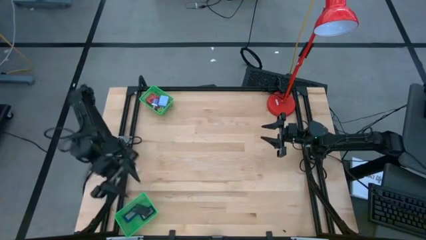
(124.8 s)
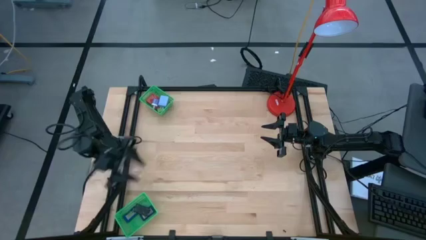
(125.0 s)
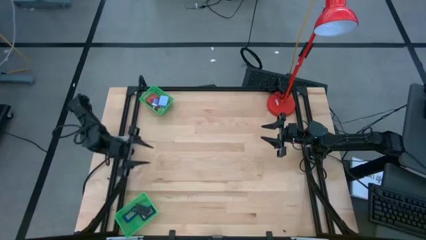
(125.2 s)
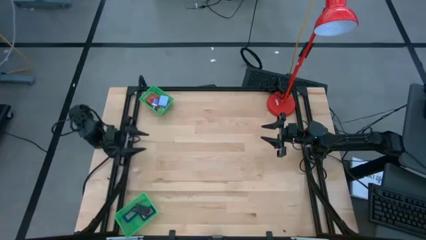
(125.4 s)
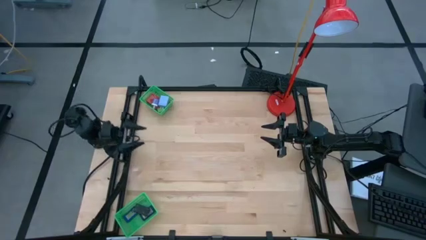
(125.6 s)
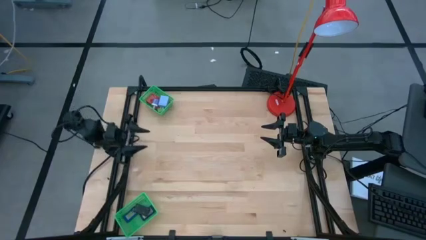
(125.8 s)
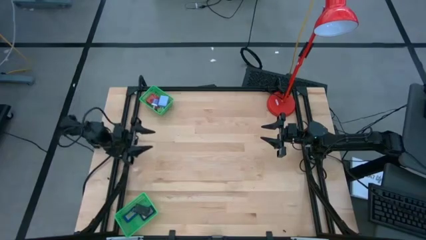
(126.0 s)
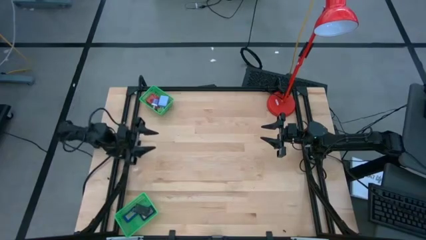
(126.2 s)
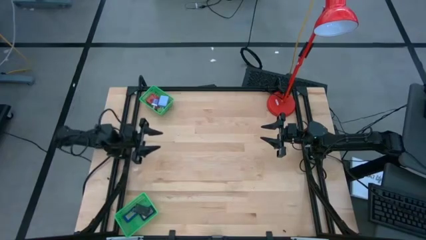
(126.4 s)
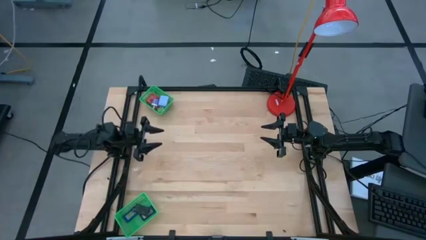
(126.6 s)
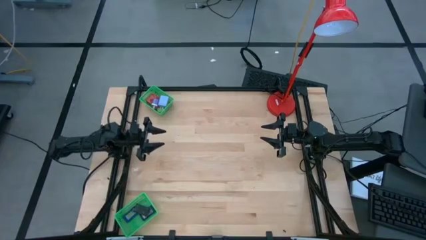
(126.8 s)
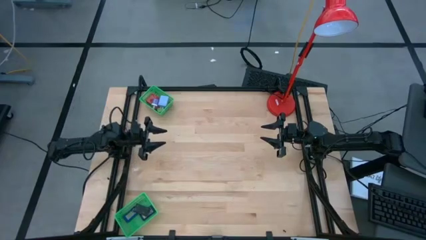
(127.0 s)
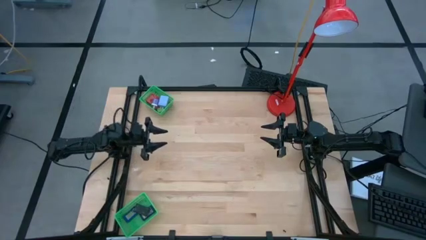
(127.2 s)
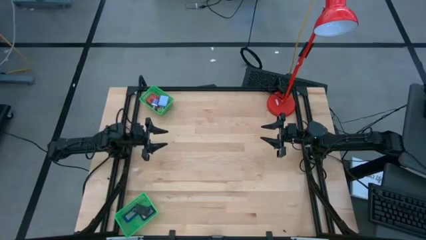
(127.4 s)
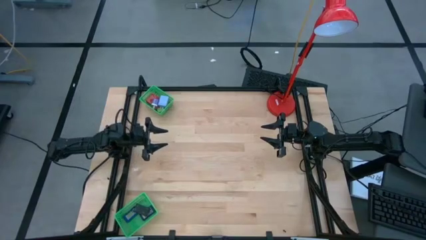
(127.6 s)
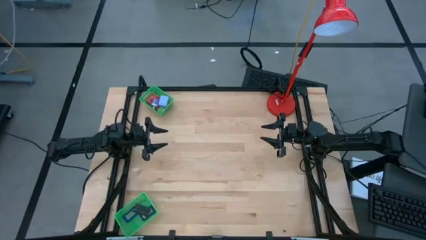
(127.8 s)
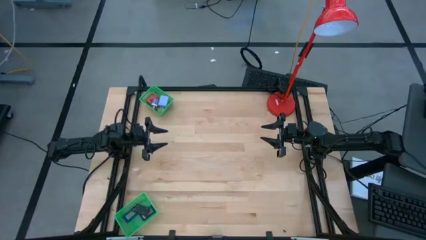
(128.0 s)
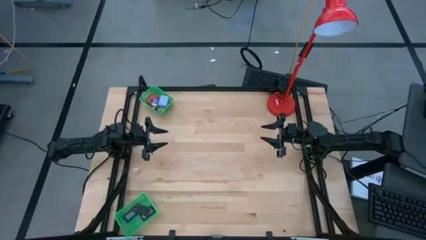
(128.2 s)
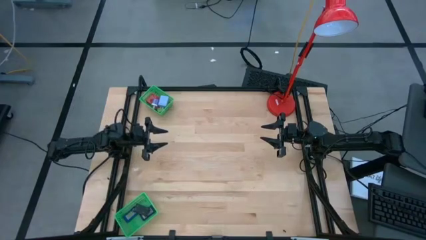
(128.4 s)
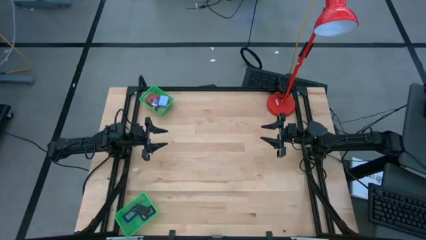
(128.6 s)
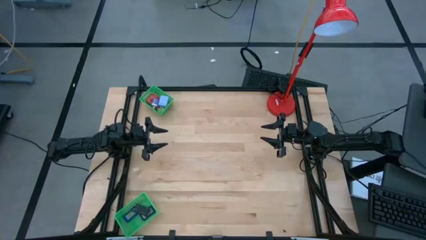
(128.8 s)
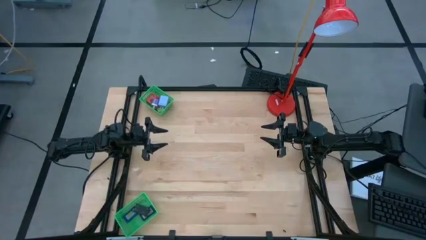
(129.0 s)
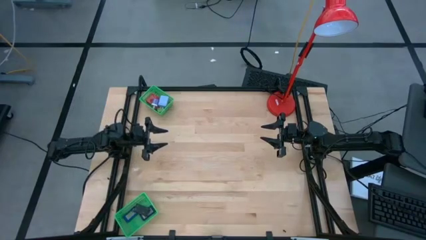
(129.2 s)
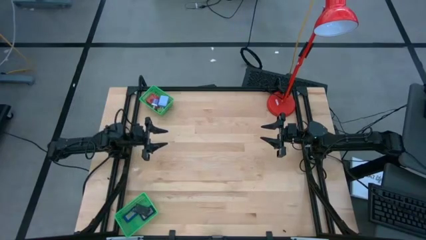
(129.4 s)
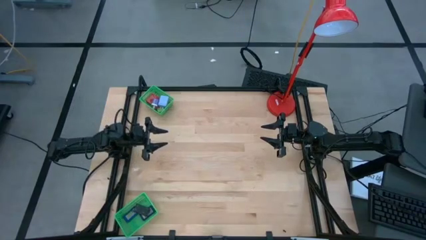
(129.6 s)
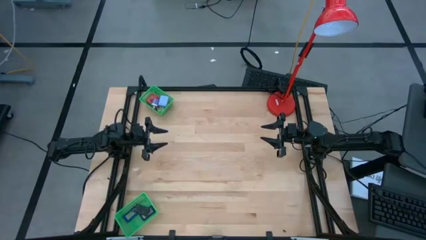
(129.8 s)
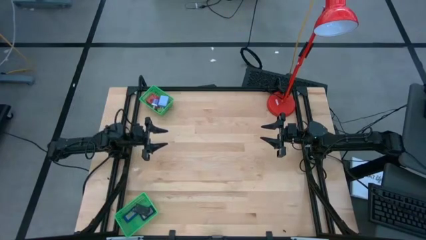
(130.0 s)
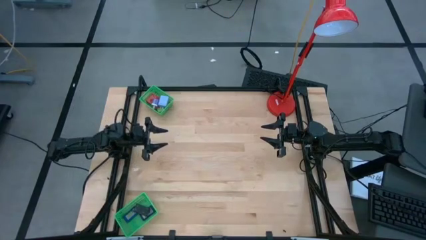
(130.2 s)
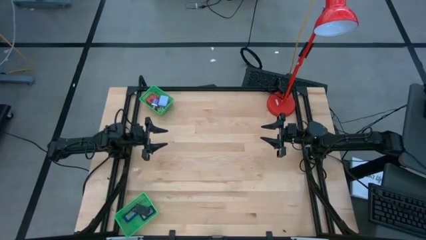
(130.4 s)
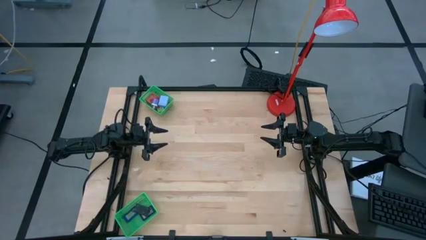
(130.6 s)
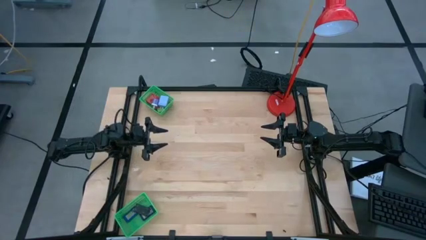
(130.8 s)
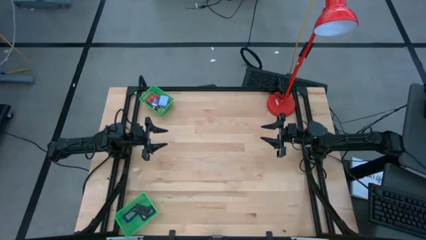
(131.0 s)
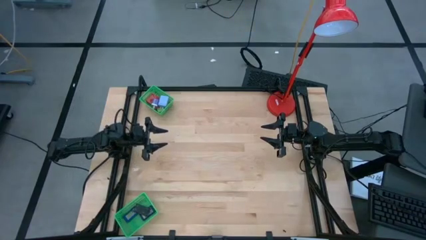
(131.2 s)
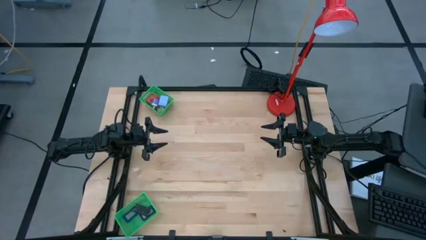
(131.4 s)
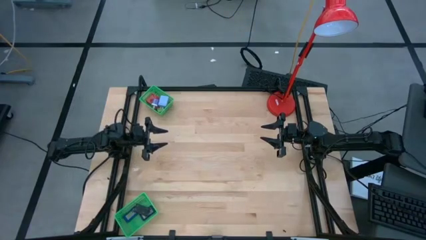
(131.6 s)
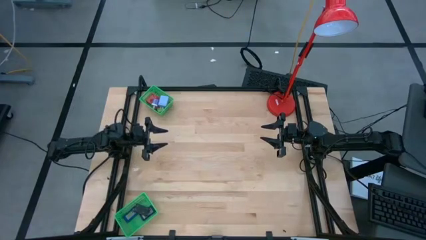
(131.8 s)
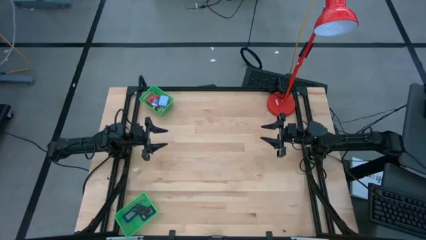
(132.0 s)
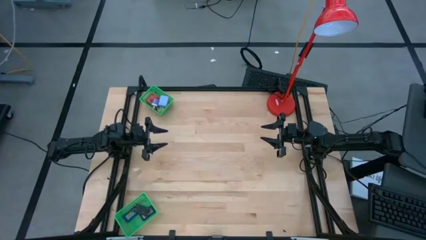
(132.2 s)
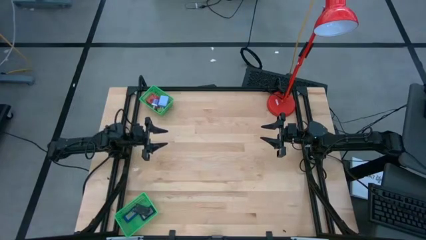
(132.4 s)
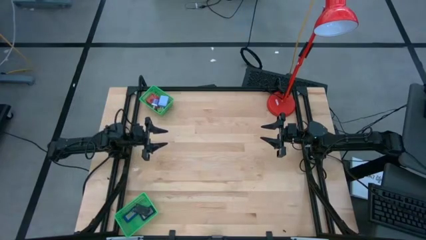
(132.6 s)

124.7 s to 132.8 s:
Task: Pick & Place Office items
Return to home position

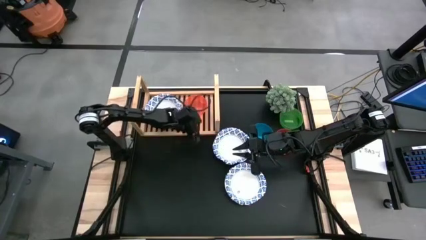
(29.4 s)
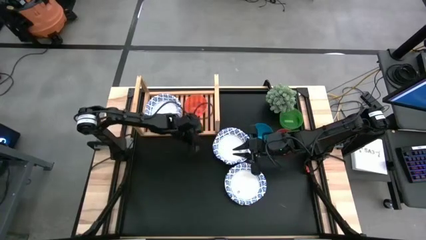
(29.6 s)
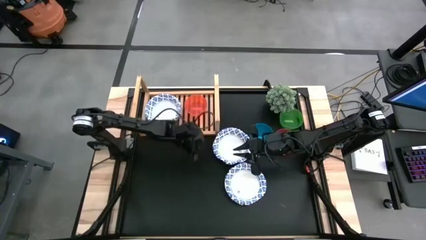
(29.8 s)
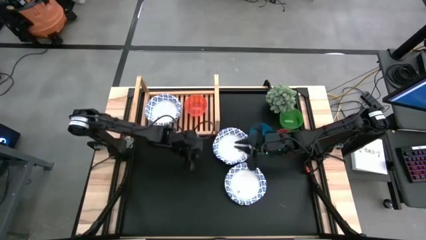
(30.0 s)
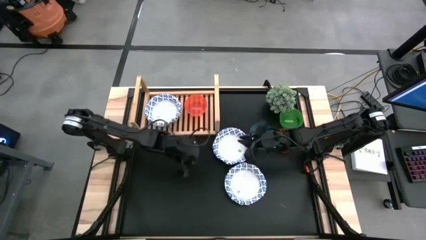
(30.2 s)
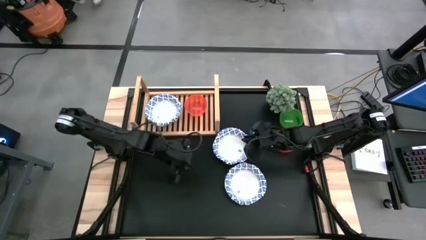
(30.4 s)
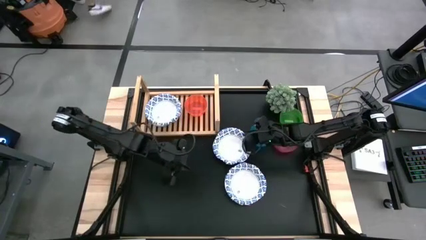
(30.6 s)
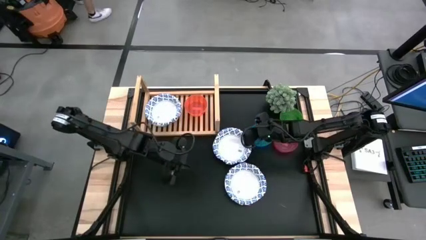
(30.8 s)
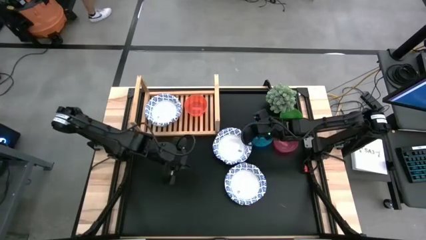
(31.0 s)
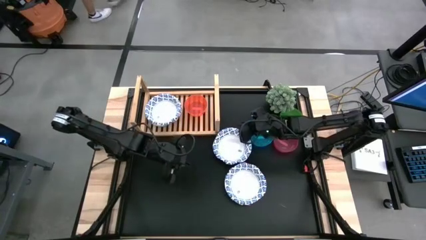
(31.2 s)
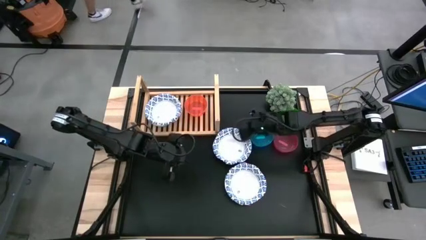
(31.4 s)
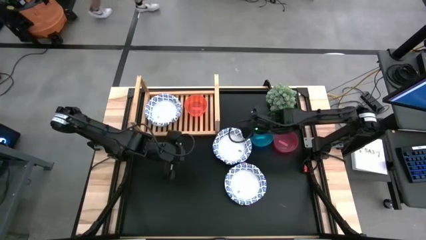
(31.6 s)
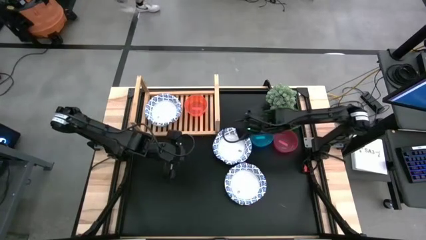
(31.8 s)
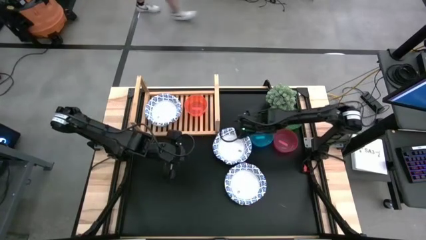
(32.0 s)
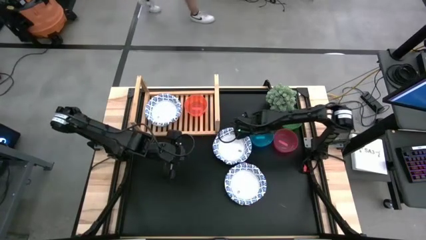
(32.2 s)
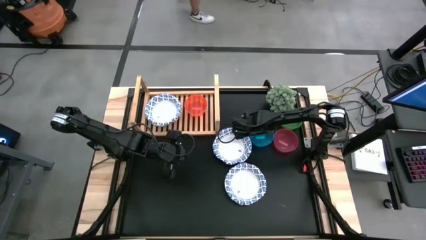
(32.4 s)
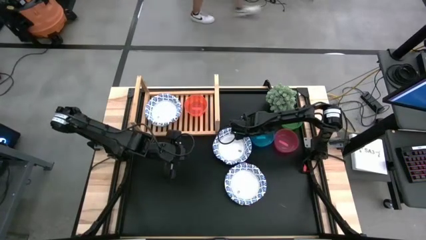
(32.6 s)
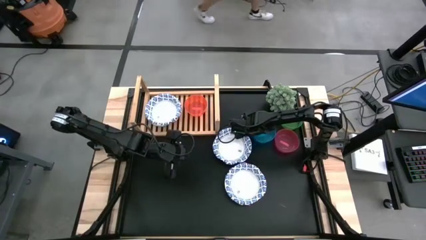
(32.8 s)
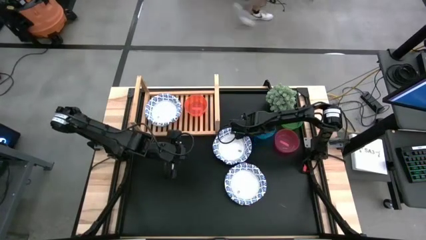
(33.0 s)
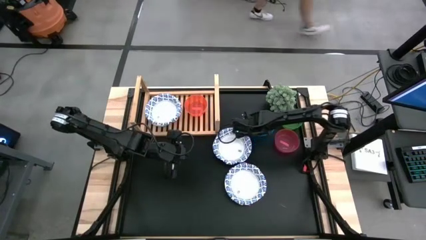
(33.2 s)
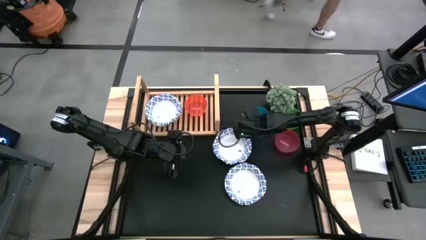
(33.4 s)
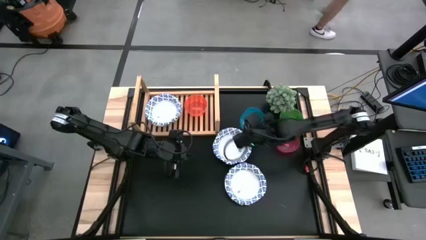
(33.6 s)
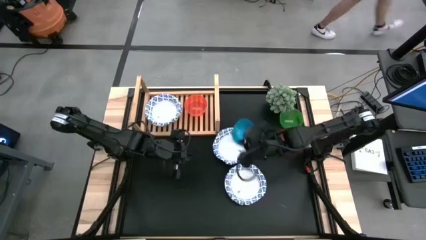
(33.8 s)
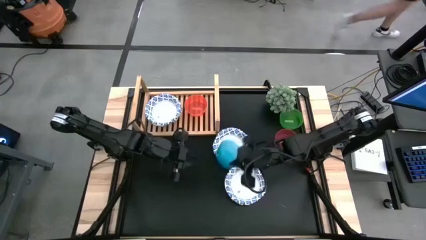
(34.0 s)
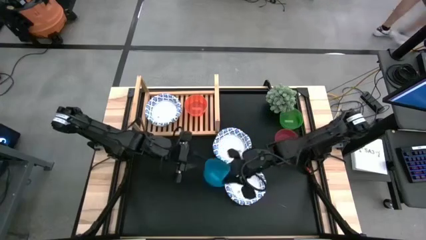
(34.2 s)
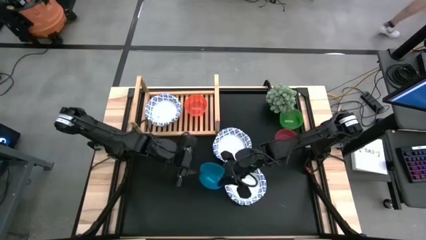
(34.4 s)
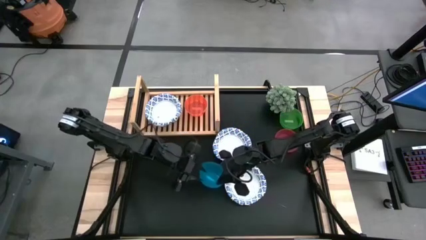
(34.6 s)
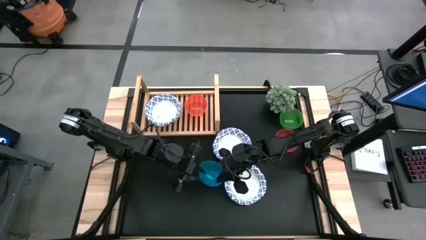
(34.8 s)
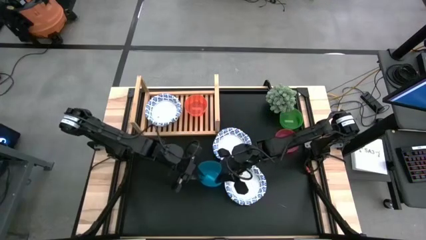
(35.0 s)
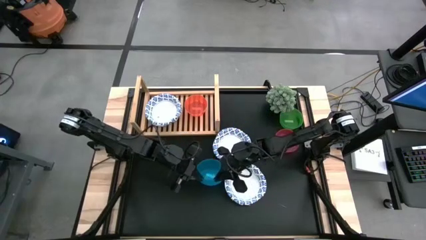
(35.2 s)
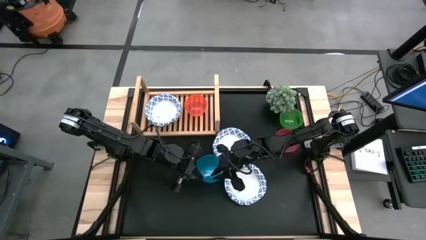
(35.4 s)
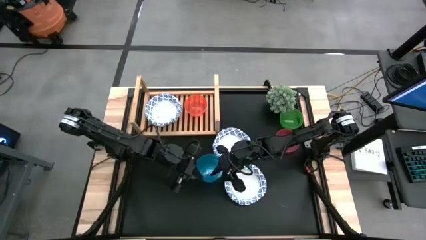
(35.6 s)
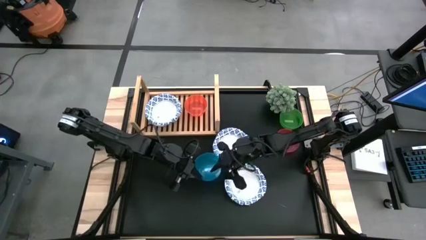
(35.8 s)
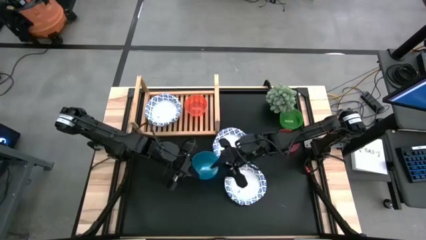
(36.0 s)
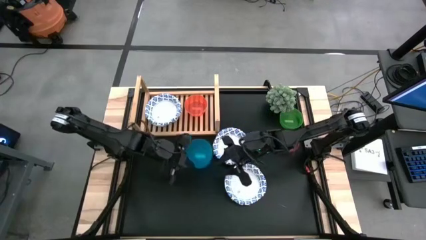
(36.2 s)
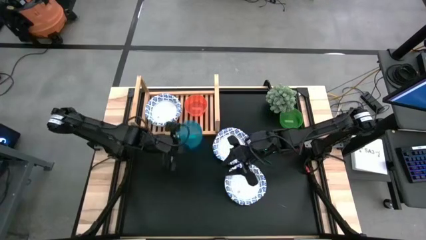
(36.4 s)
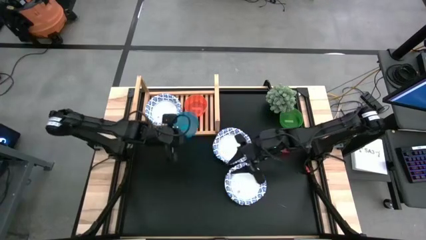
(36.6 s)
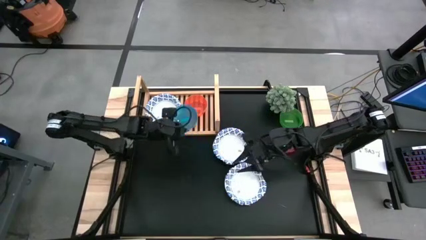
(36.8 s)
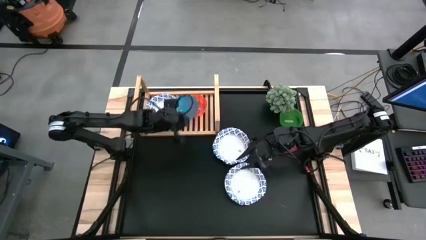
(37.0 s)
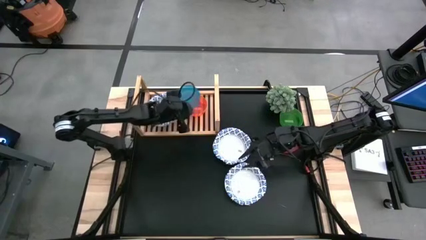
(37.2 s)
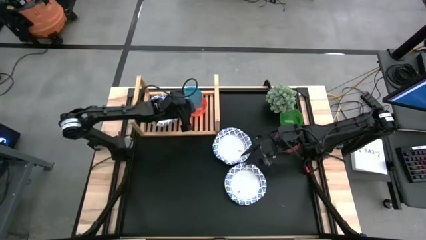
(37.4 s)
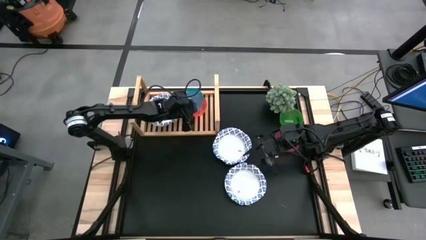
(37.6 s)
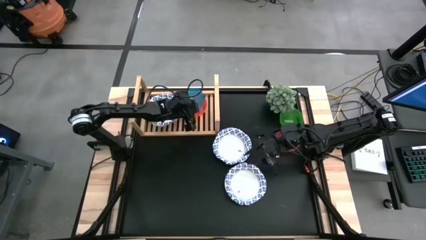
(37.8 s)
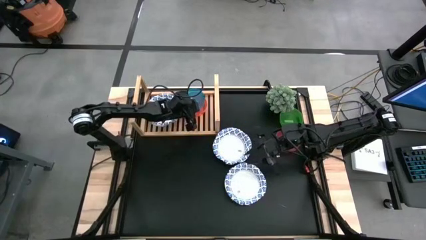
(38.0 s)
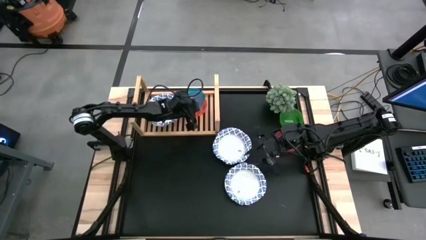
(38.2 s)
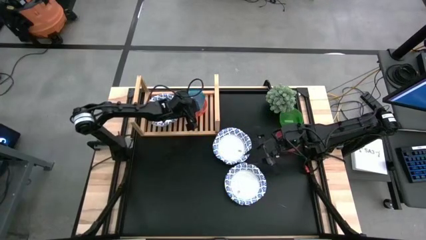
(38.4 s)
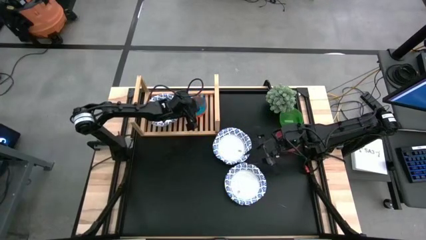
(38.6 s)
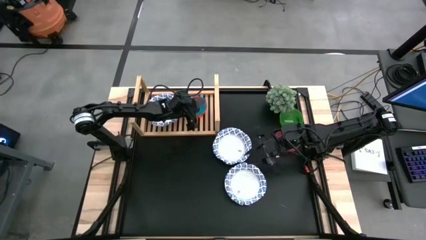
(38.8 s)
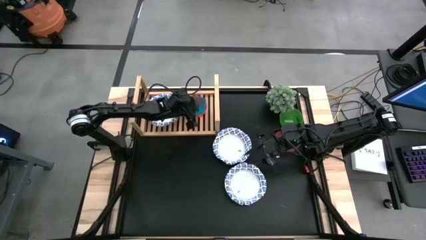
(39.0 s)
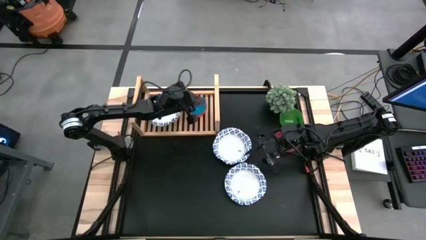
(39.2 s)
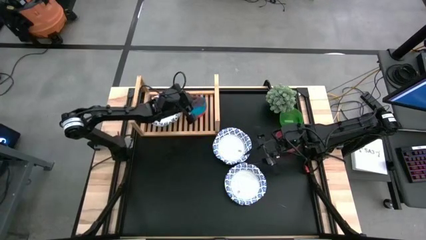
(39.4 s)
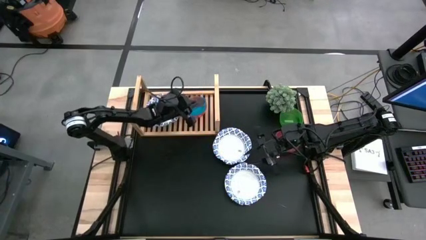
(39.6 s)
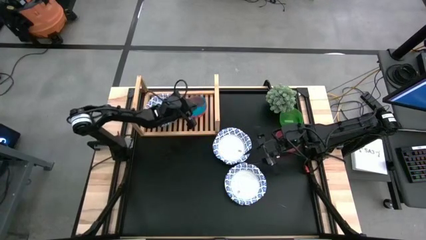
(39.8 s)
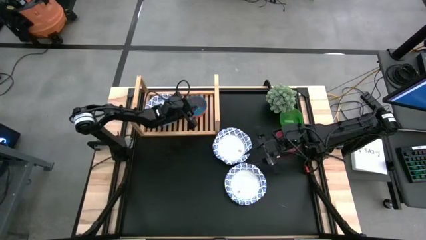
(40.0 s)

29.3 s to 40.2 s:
Task: Place and stack plates onto a shelf
Stack the blue bowl on top of the orange bowl
